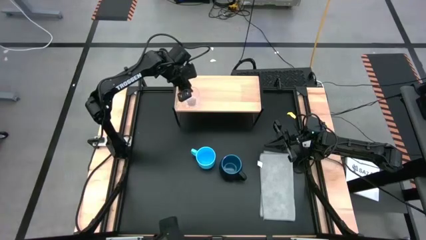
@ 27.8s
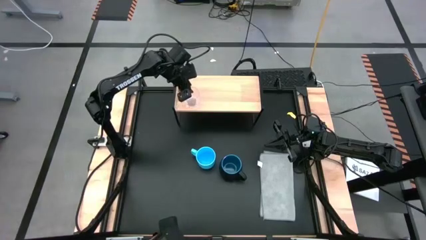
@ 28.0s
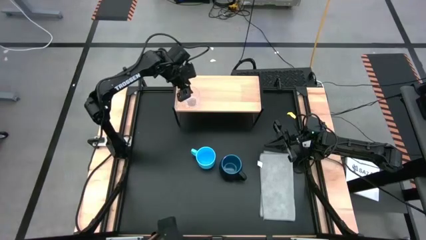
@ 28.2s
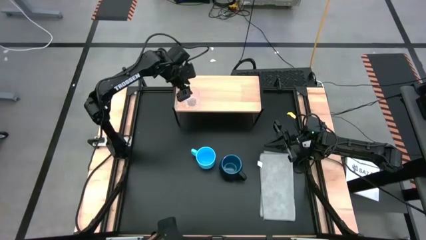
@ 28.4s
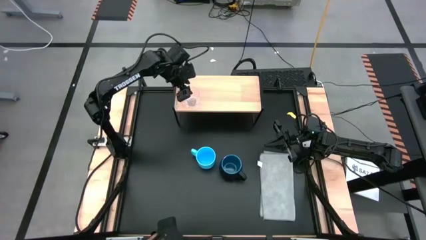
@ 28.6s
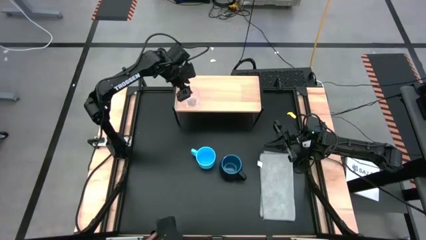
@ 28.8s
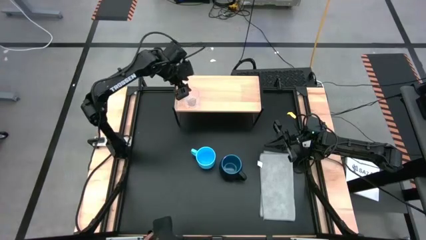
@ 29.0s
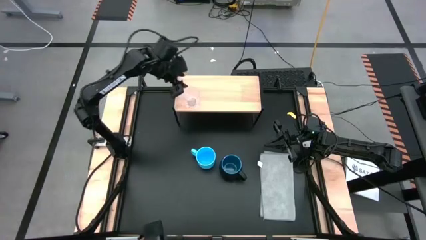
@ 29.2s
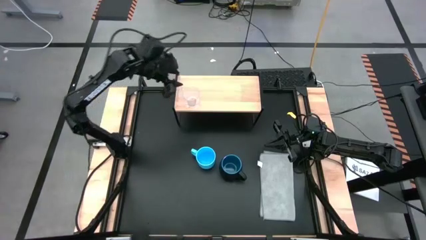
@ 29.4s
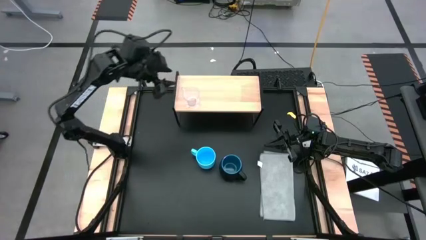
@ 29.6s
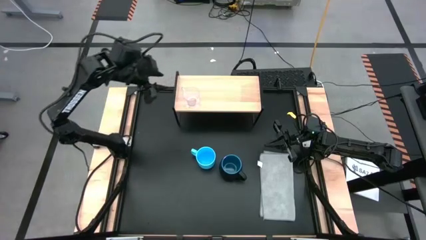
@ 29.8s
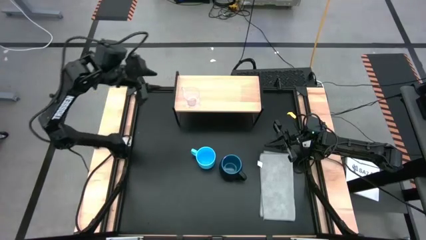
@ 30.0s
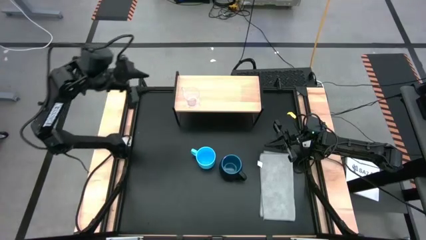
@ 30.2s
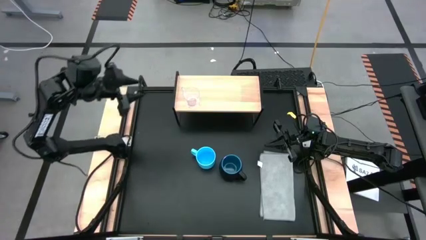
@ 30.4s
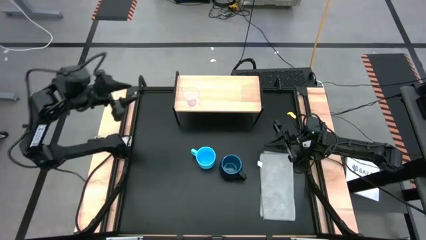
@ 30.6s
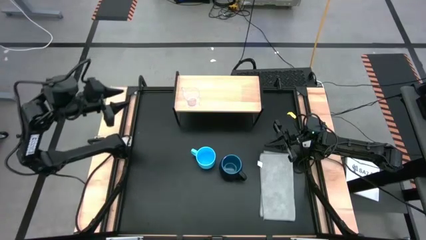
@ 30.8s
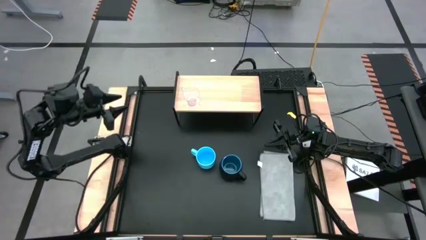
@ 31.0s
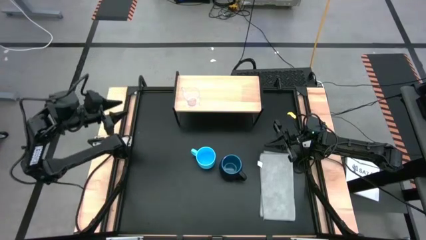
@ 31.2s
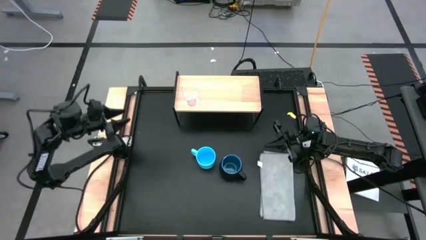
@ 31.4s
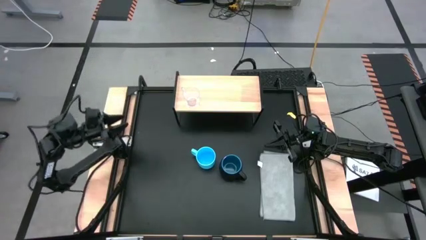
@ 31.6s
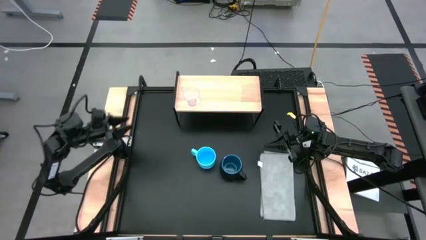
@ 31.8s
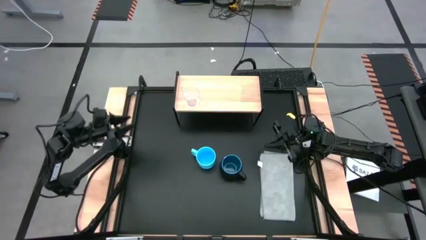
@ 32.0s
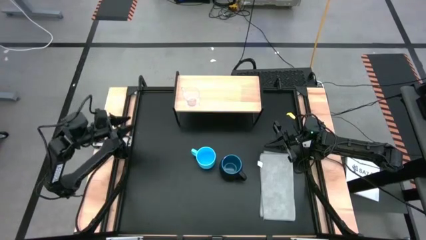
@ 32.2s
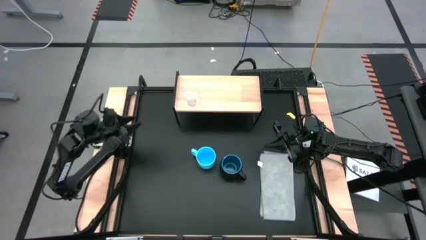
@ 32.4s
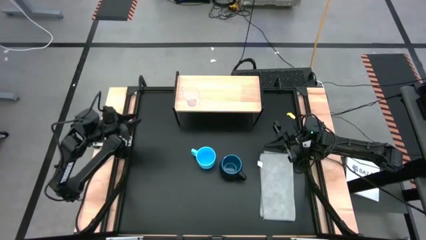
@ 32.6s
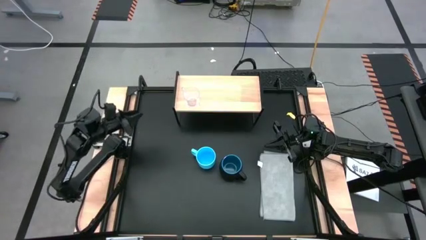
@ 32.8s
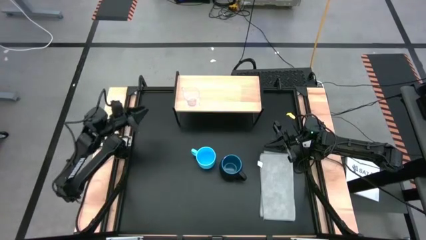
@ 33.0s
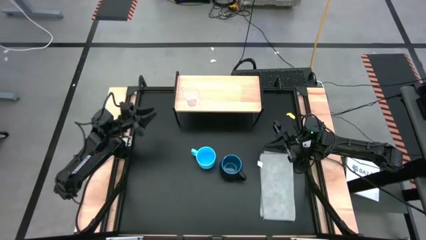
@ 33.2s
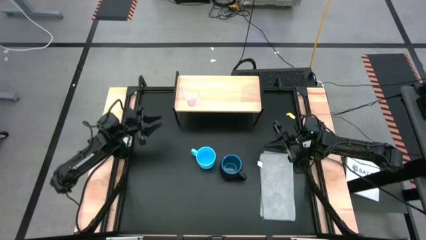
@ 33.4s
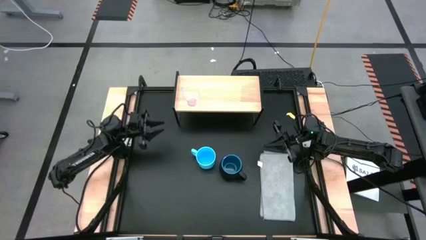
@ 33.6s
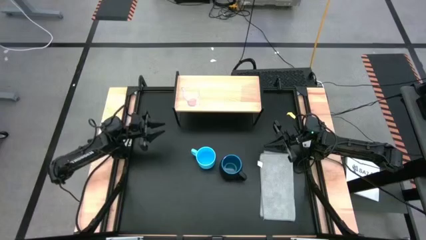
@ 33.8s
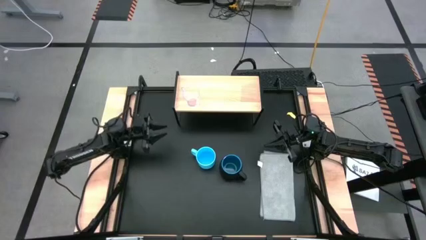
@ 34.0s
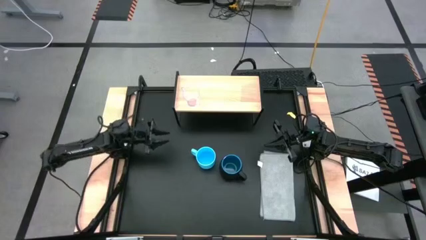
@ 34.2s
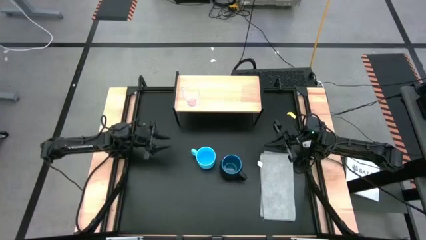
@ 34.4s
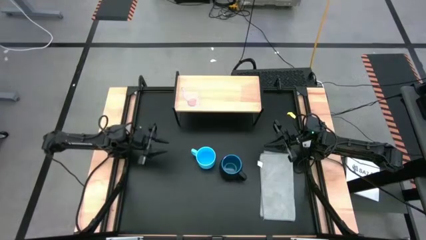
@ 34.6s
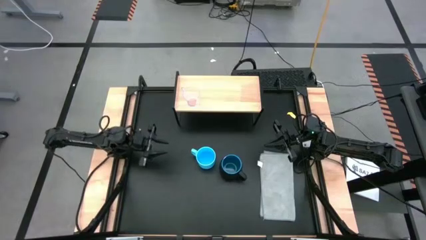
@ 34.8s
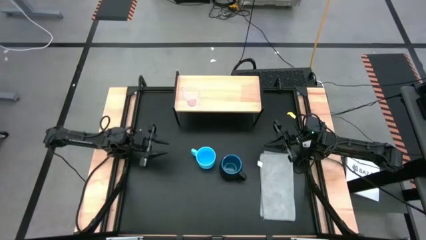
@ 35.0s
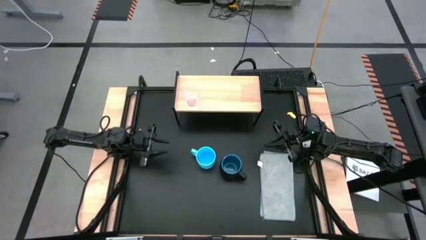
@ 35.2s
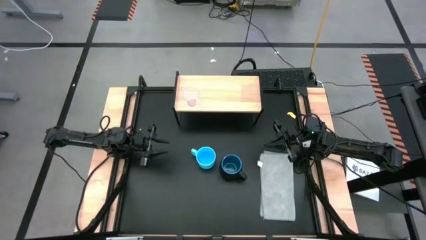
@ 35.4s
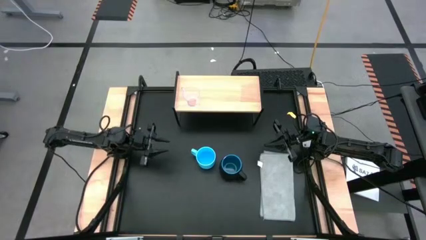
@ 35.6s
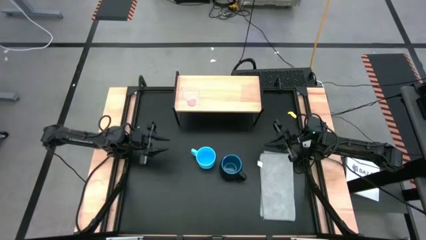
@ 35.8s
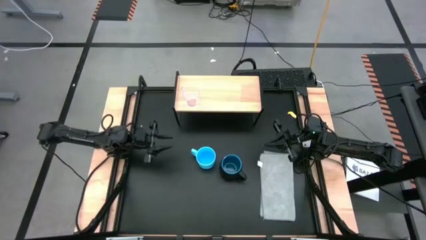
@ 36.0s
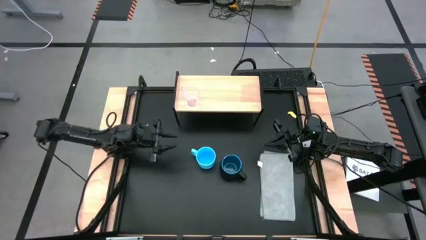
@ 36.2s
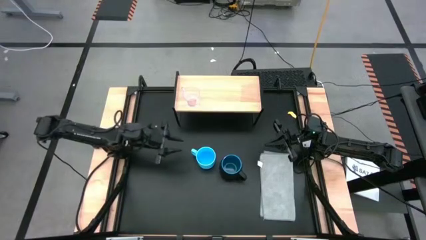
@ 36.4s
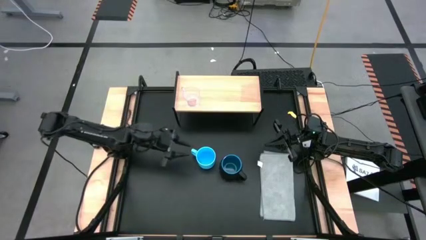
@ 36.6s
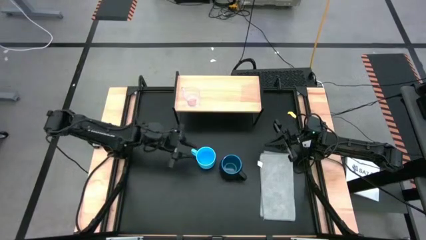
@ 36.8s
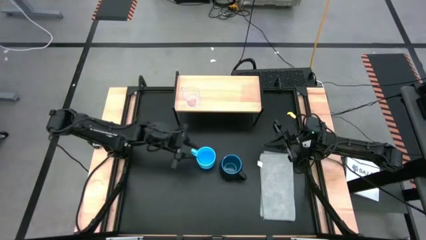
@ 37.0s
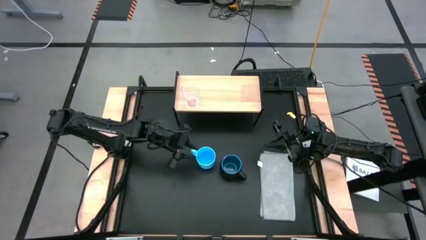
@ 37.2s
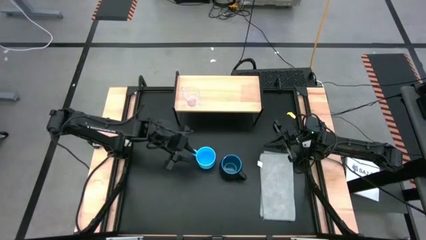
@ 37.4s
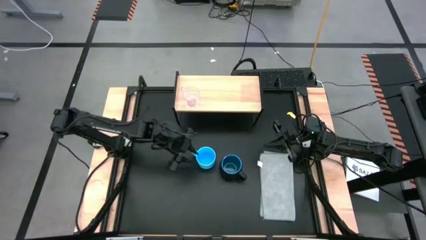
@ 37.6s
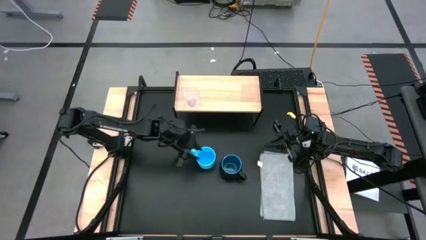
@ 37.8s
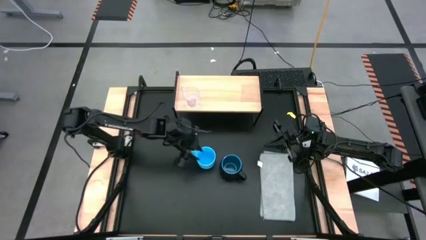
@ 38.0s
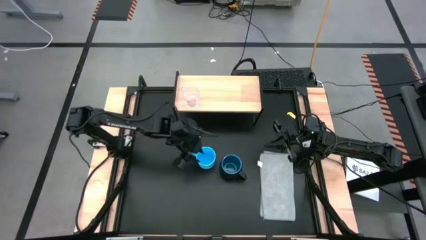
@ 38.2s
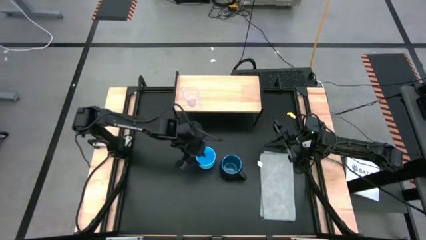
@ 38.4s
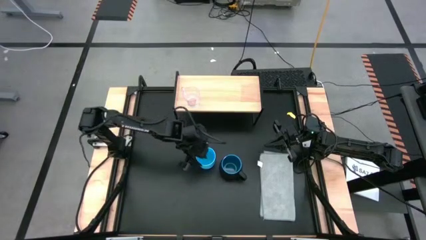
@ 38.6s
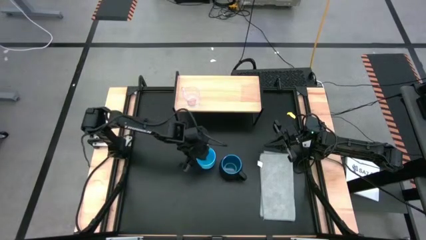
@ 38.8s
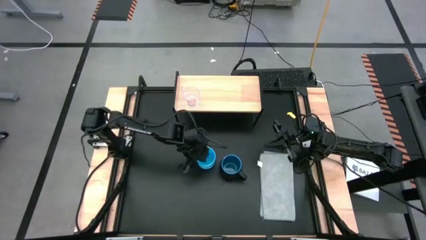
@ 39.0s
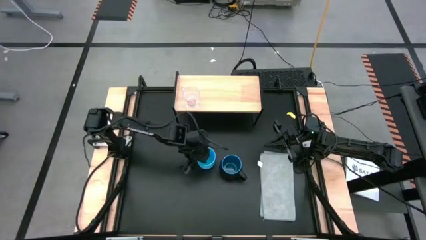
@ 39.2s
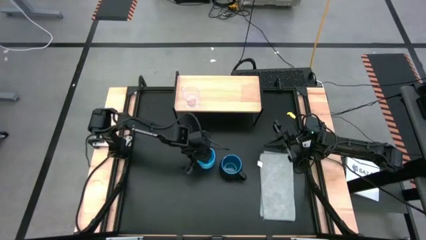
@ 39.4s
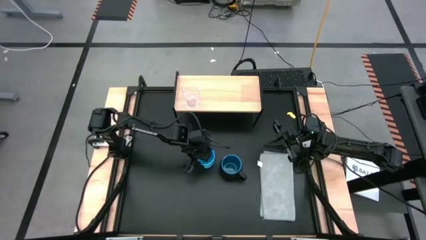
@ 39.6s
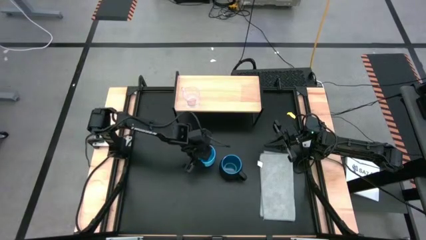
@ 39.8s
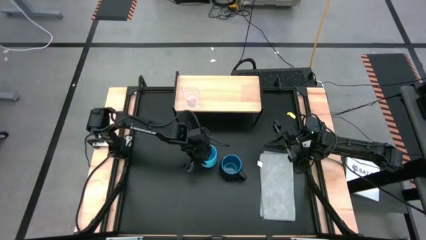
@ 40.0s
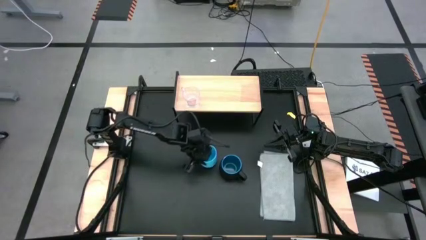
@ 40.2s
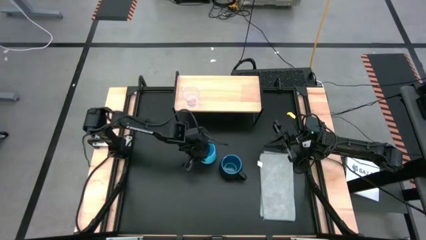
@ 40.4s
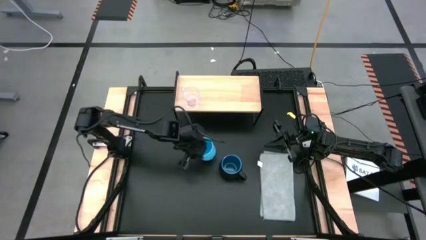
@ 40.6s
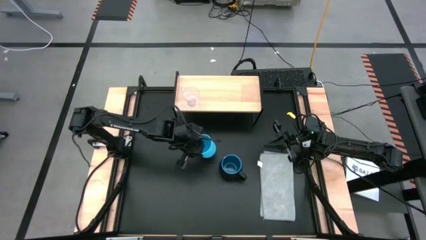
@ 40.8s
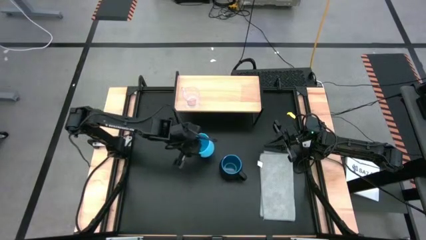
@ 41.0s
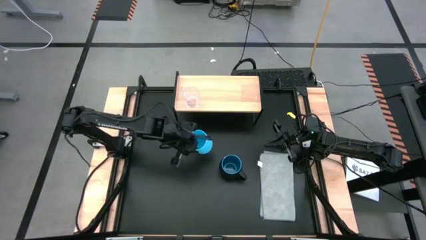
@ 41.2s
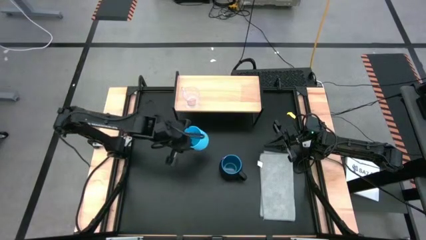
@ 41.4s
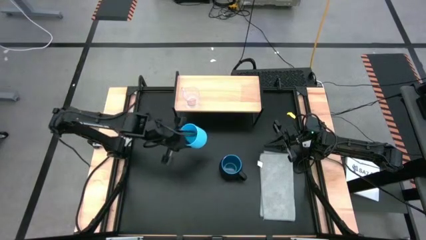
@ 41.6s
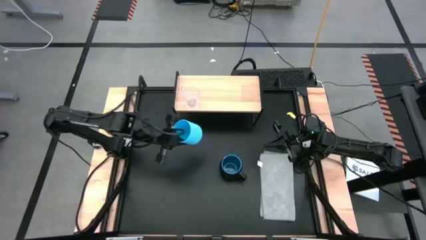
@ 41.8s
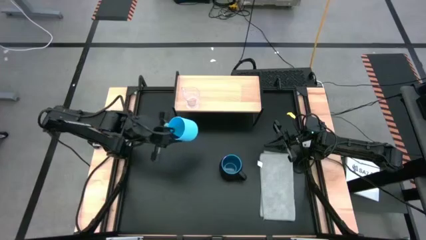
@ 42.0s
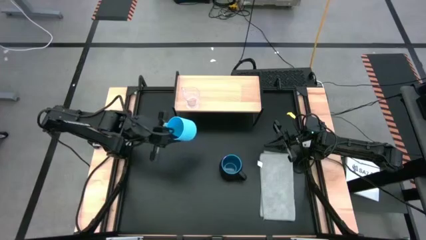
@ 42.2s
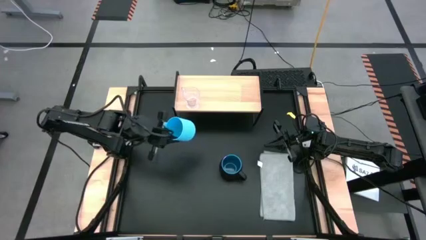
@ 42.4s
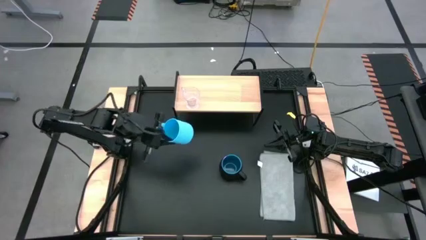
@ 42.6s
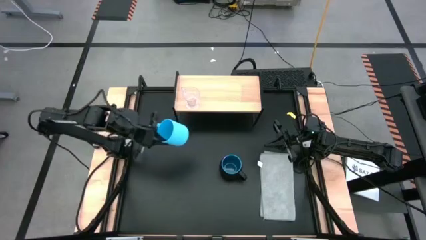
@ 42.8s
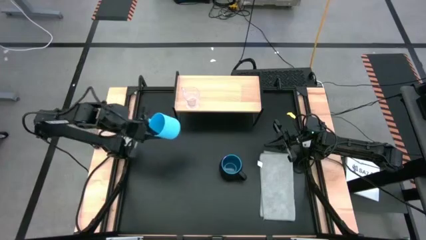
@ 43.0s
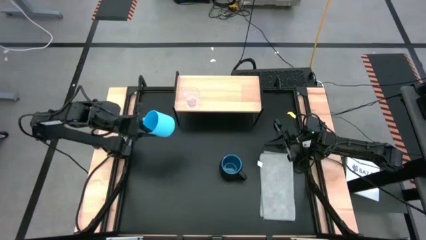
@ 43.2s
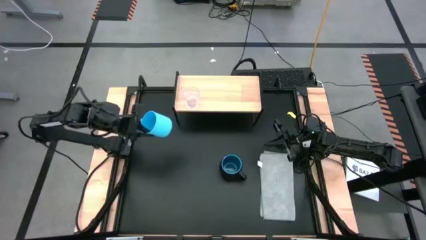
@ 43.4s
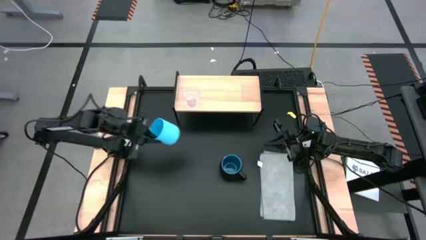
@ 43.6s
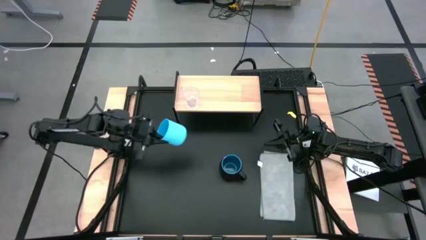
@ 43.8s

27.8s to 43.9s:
Task: Stack small to large cups/mugs on shelf
Put the light blue mug on the shelf
